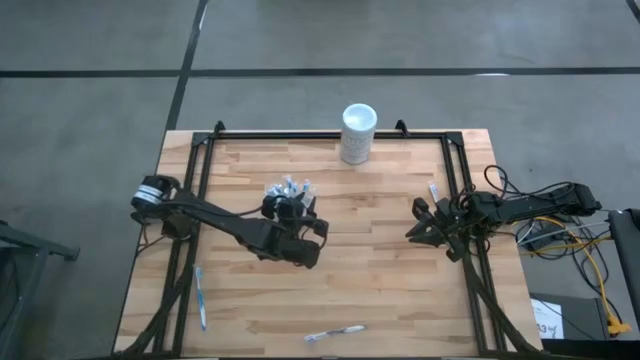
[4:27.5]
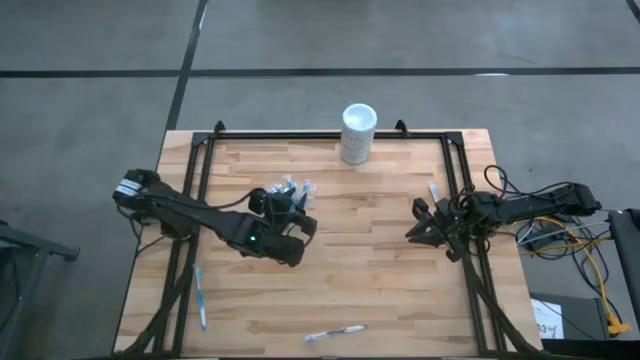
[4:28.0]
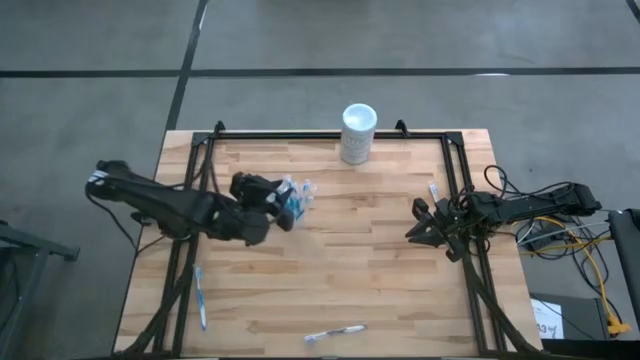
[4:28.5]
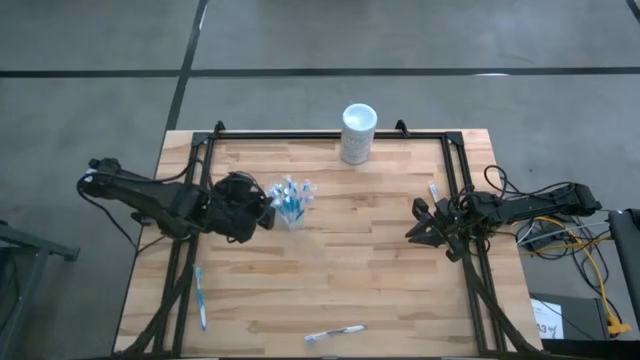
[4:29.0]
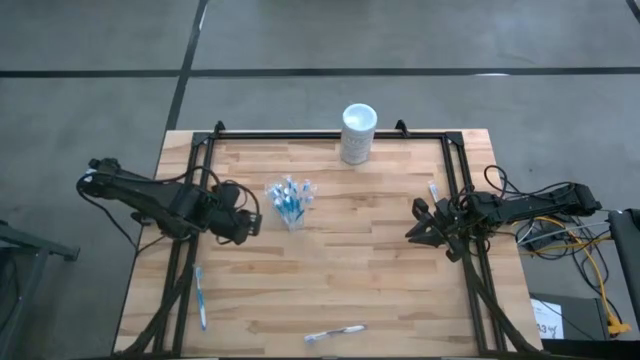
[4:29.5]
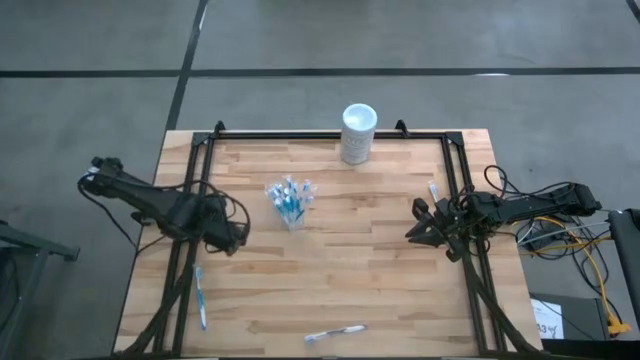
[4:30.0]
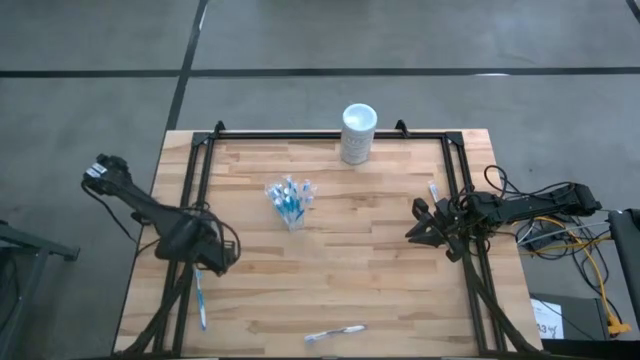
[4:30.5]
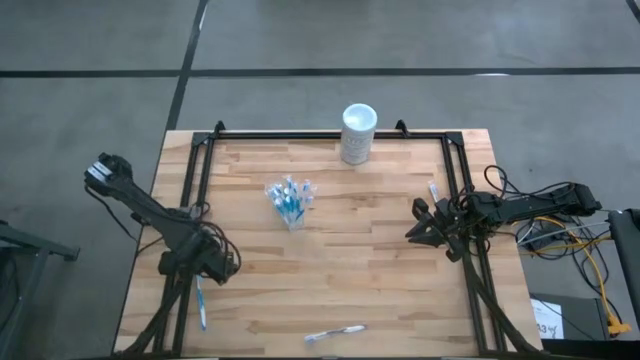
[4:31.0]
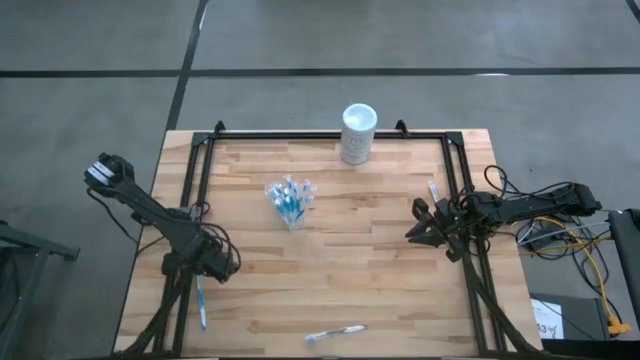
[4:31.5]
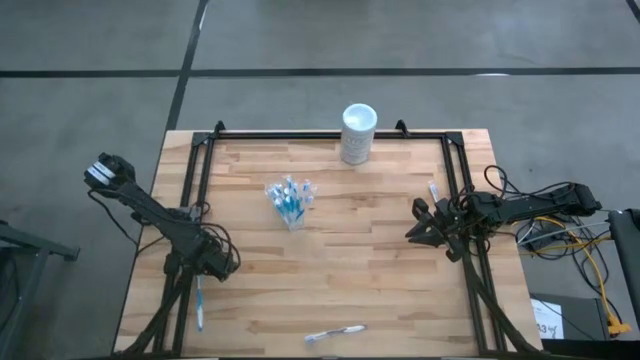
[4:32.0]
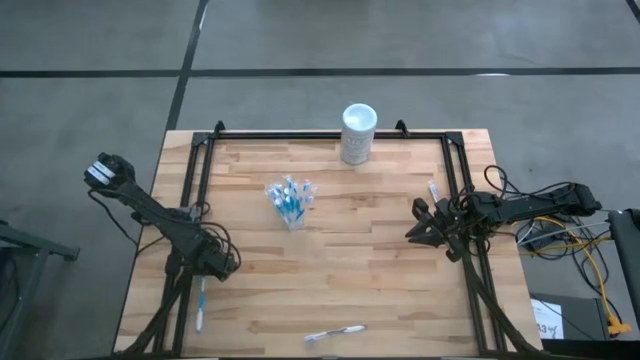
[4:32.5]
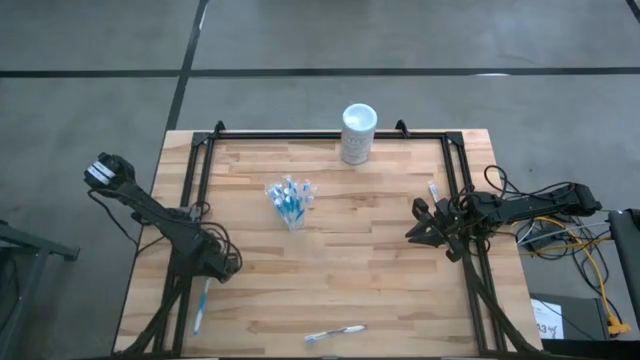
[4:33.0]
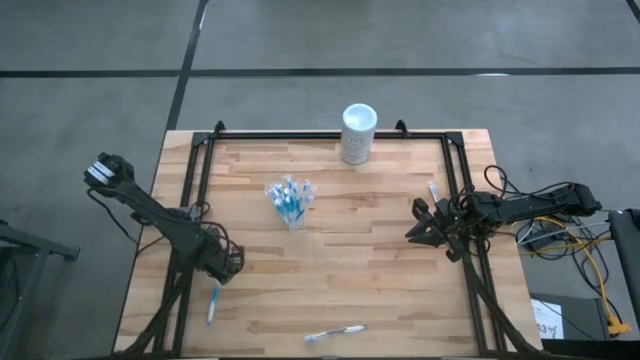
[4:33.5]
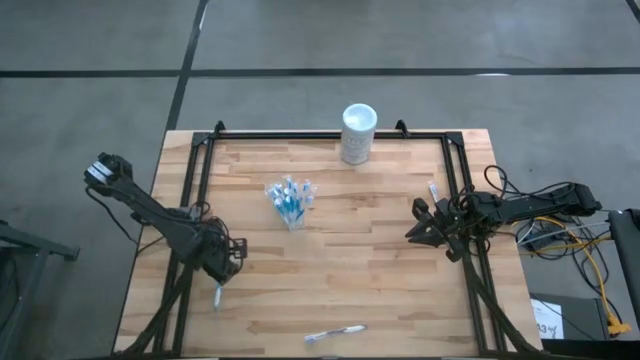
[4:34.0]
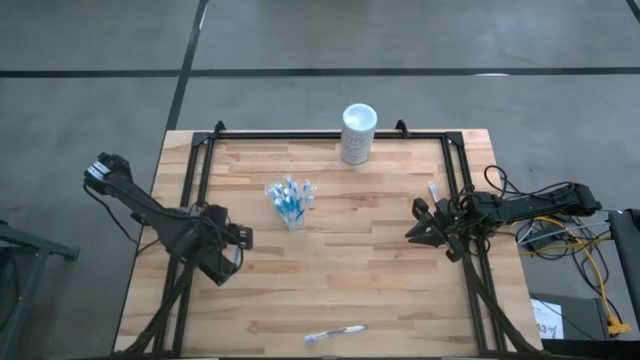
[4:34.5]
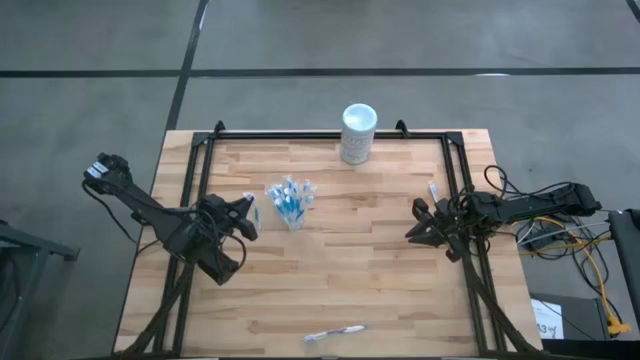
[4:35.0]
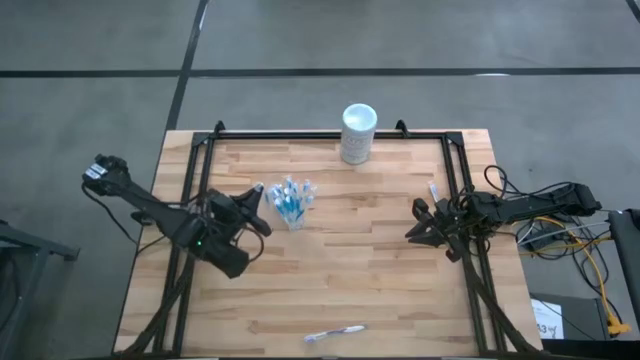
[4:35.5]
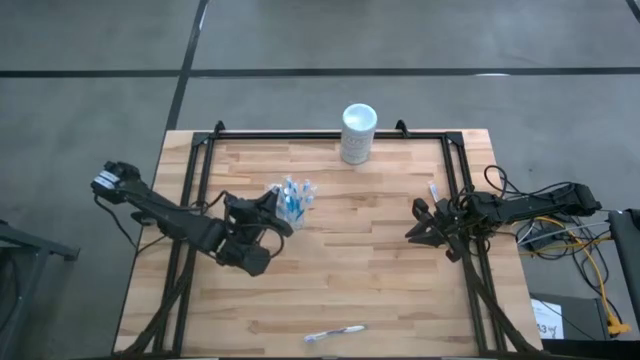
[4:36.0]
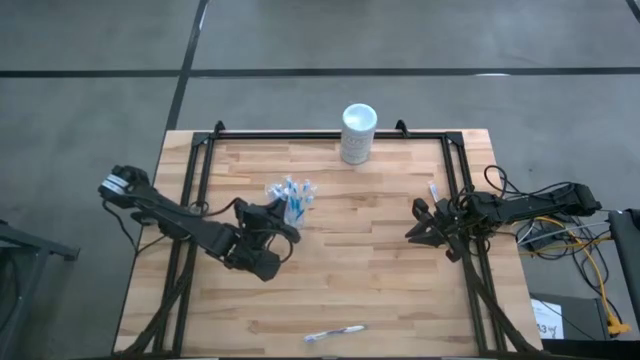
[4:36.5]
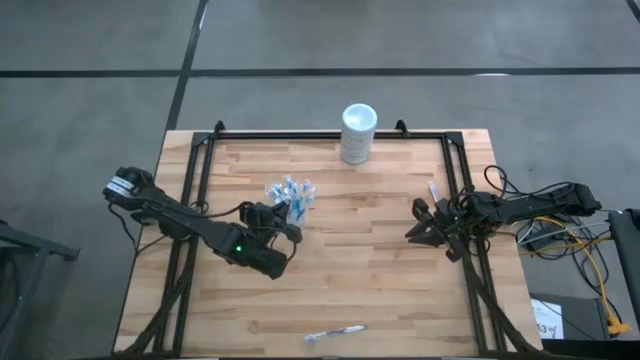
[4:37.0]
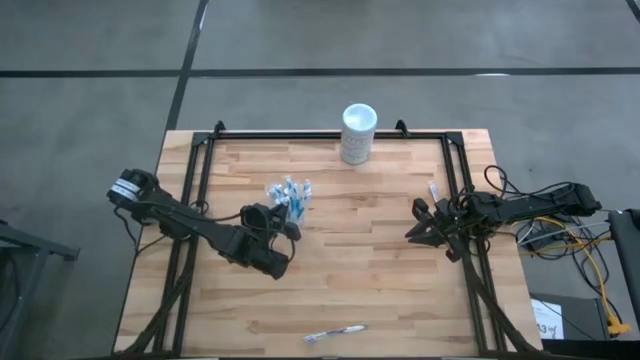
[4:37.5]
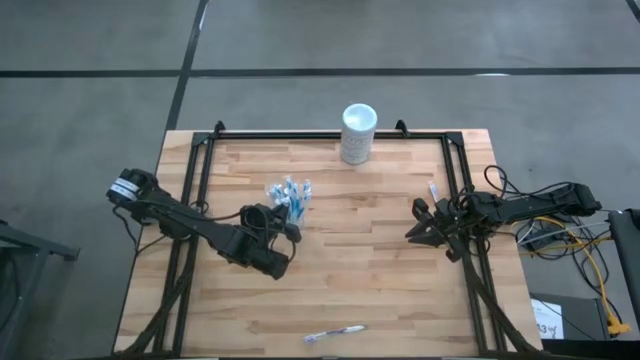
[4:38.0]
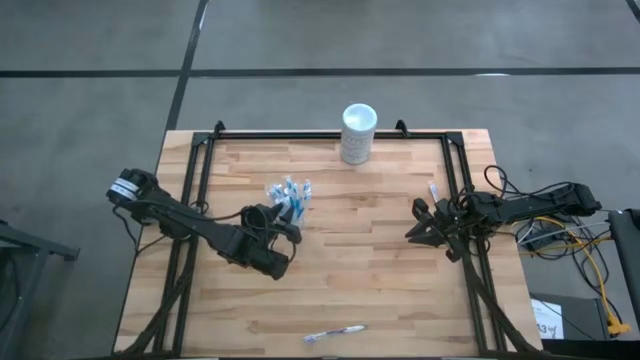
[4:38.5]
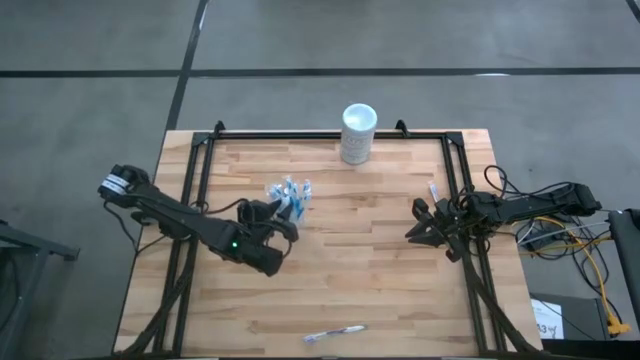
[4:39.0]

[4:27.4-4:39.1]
Task: Pick & Place toothbrushing station
Put the blue toothbrush into the transparent organizer

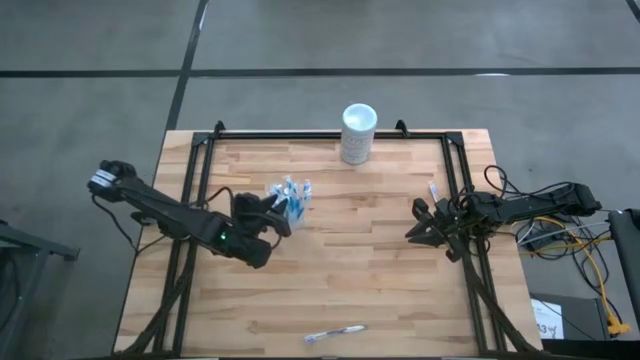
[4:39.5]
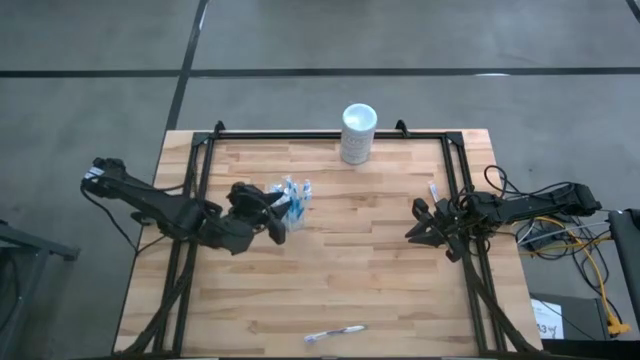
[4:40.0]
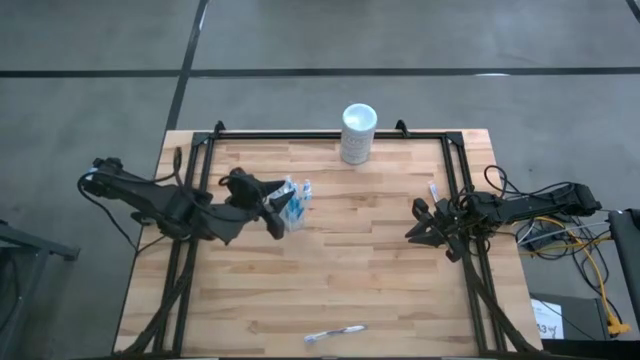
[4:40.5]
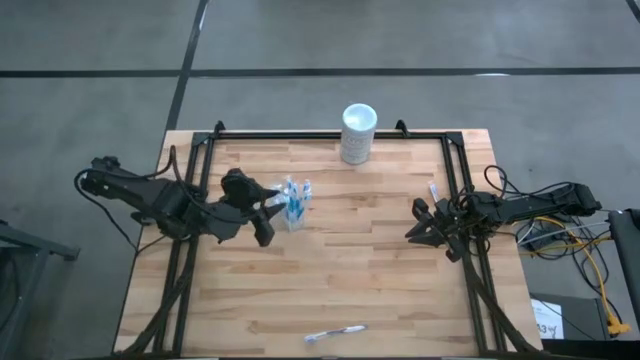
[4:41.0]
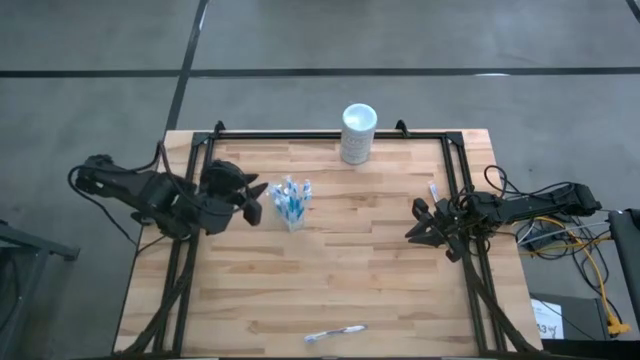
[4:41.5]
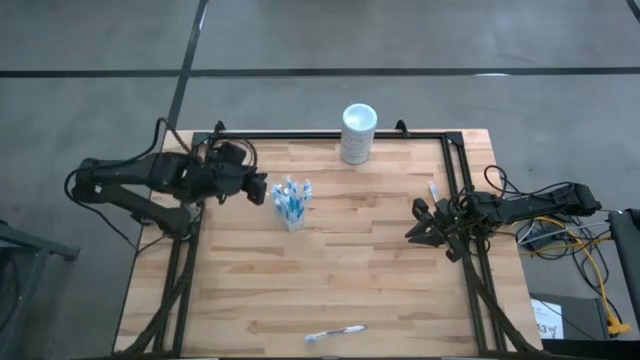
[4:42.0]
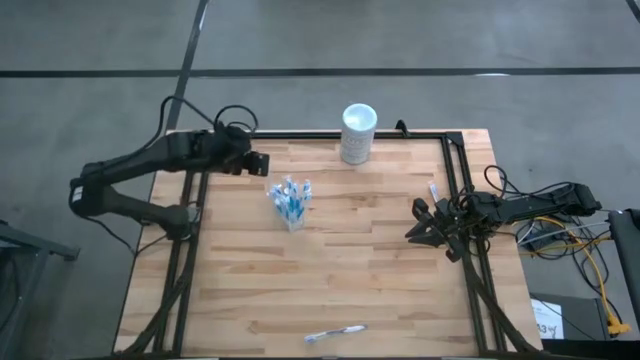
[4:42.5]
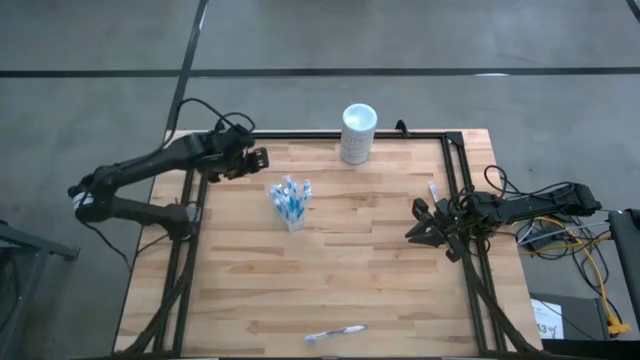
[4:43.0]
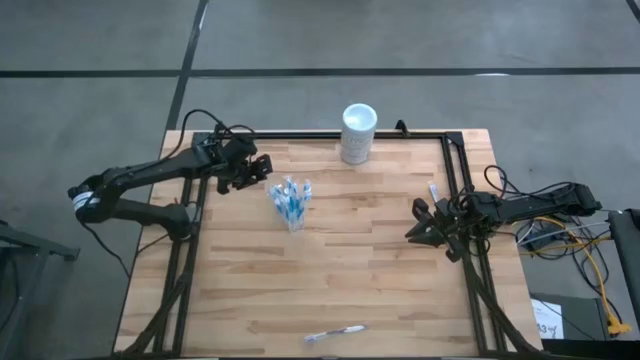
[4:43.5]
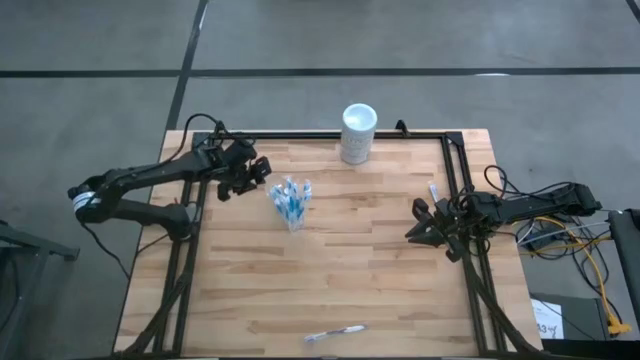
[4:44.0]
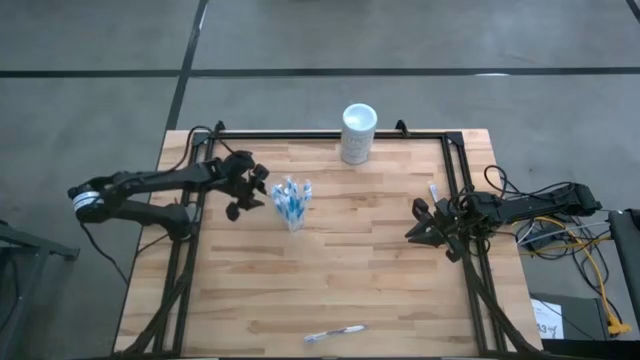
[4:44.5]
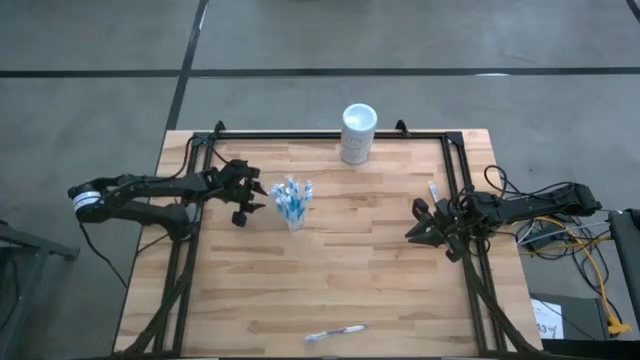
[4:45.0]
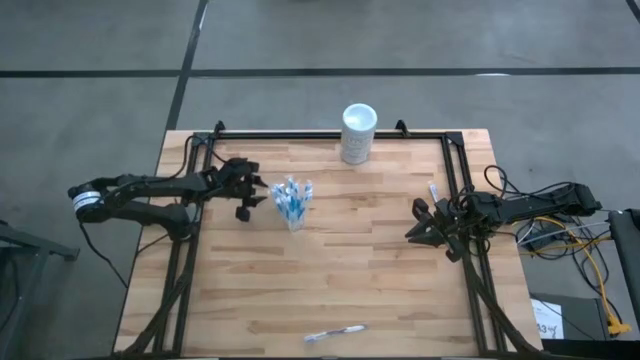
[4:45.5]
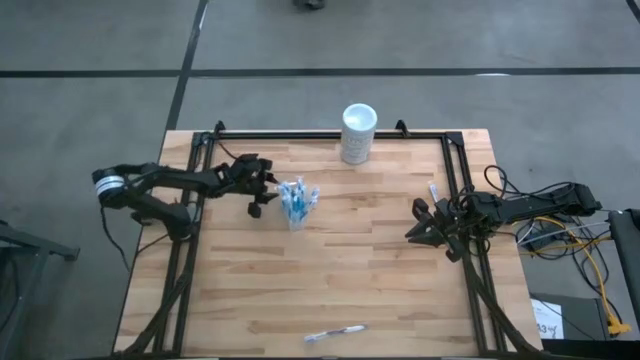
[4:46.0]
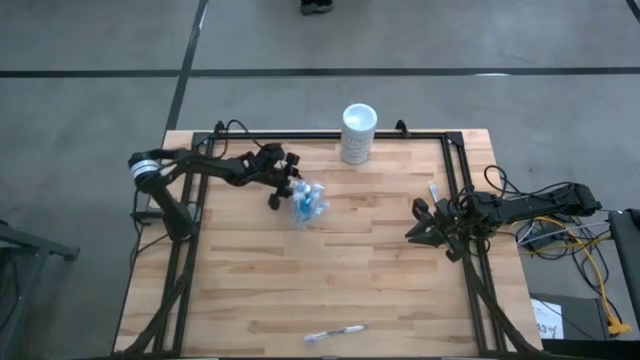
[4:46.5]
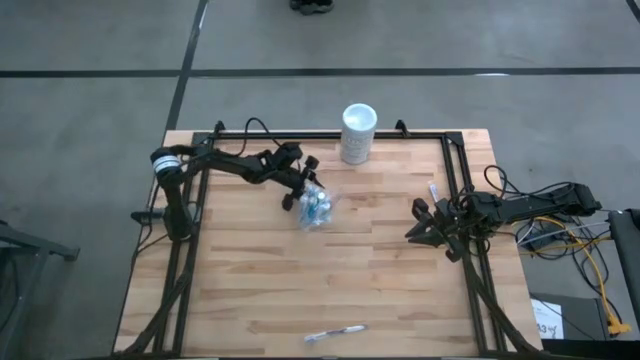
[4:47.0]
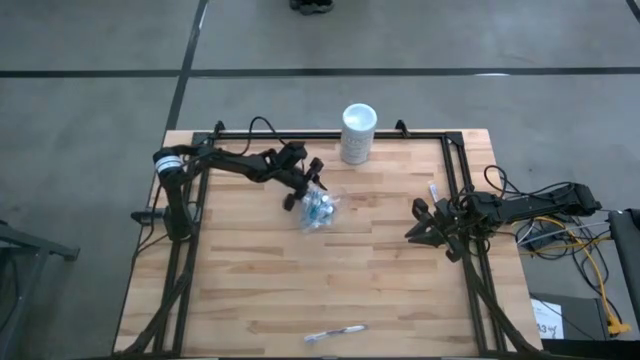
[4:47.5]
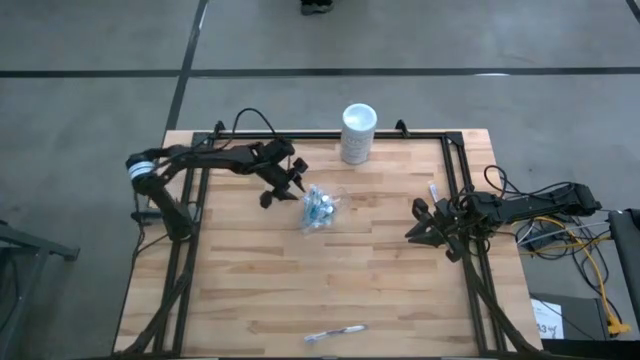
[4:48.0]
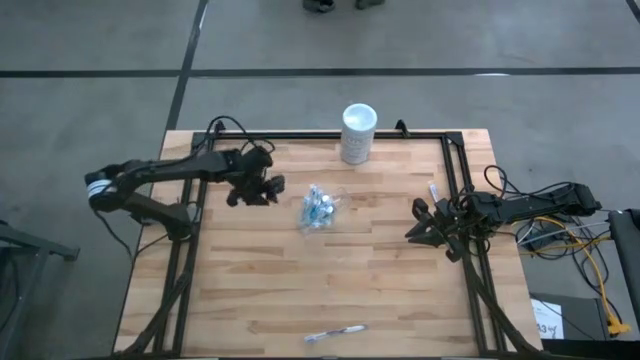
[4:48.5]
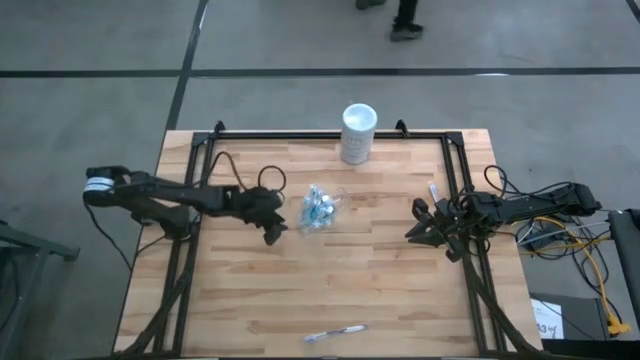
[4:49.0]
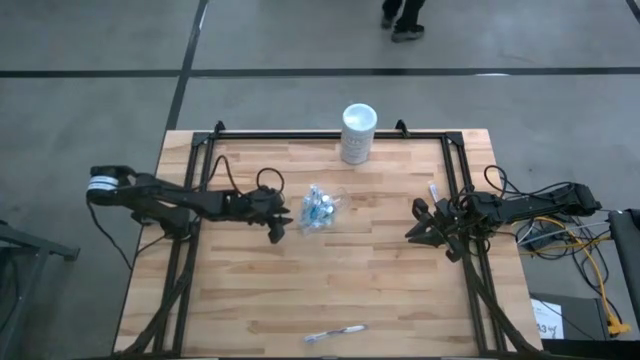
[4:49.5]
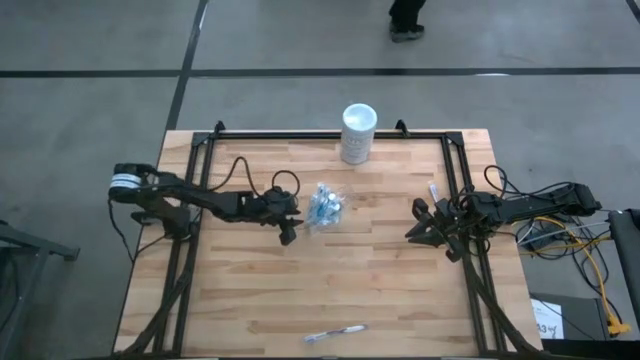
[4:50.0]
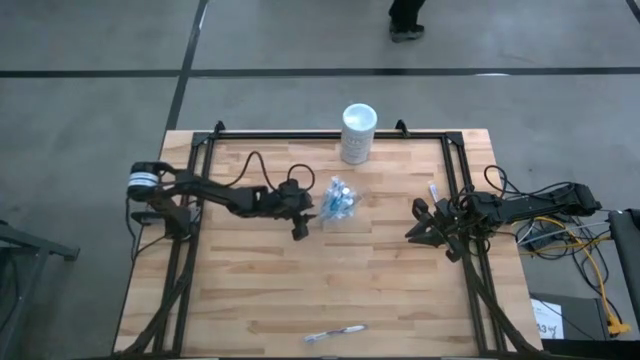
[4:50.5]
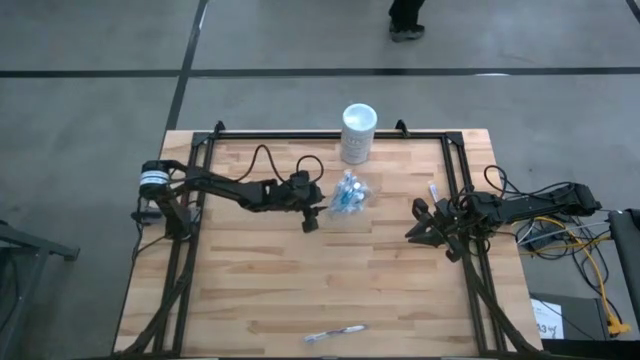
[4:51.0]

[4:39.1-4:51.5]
Move the transparent organizer to the top right of the table
